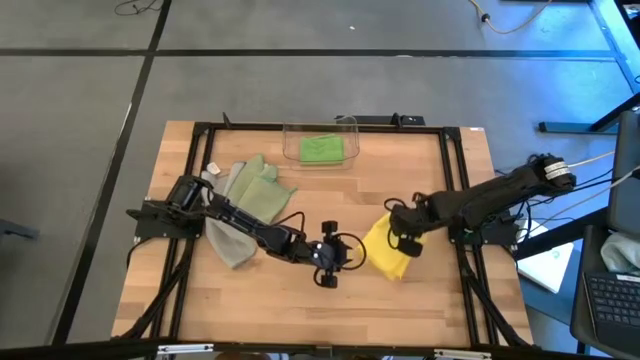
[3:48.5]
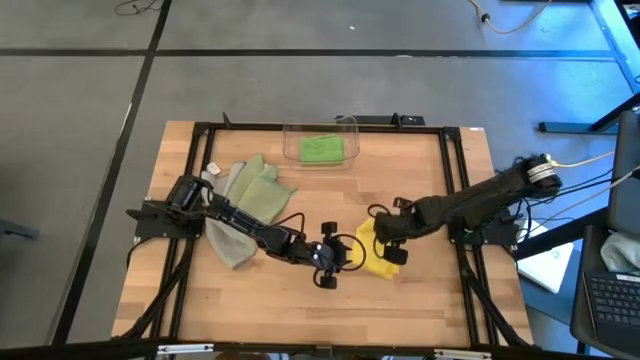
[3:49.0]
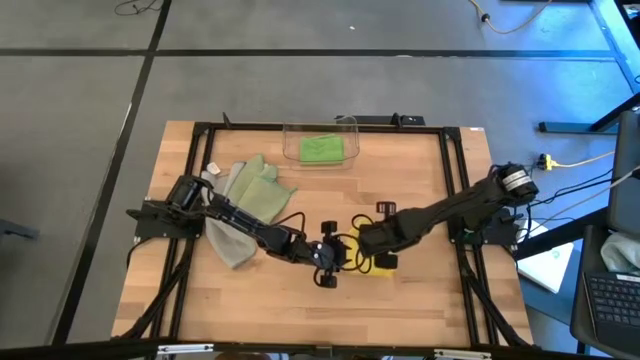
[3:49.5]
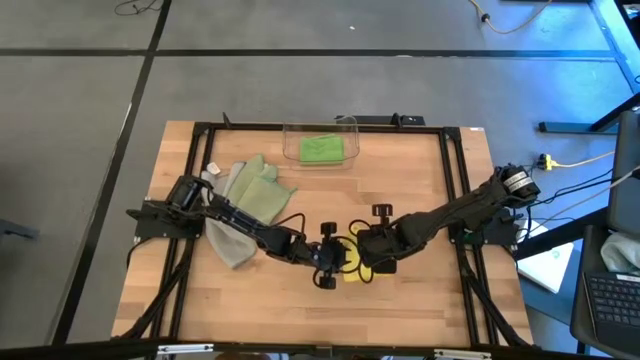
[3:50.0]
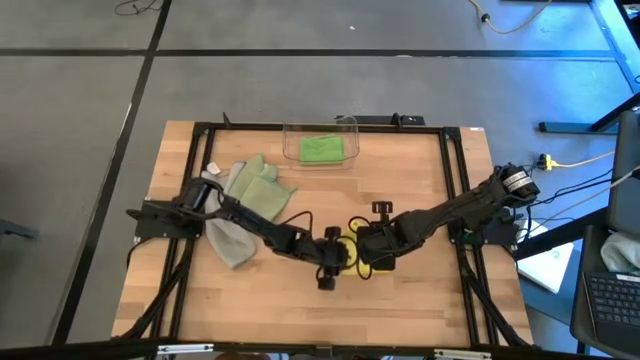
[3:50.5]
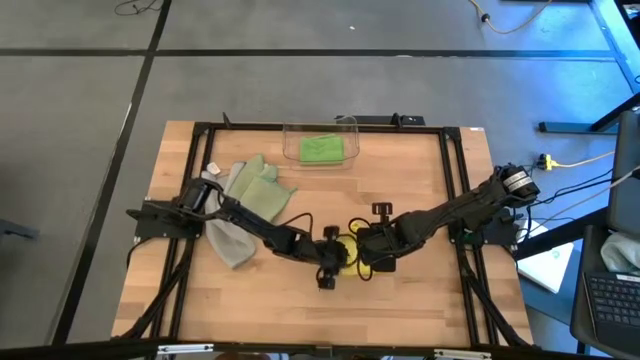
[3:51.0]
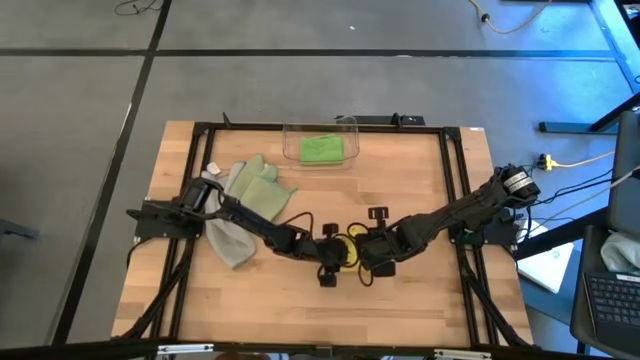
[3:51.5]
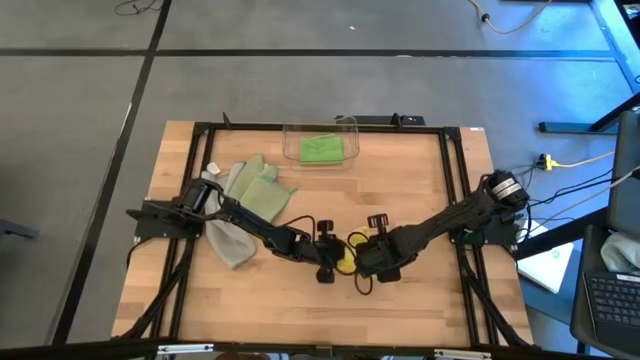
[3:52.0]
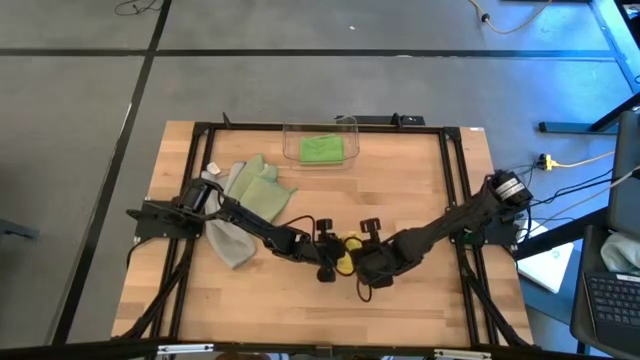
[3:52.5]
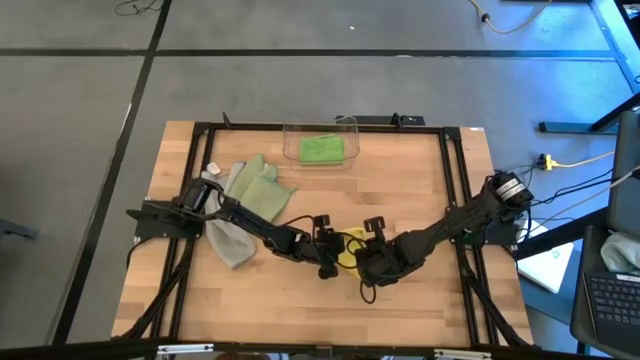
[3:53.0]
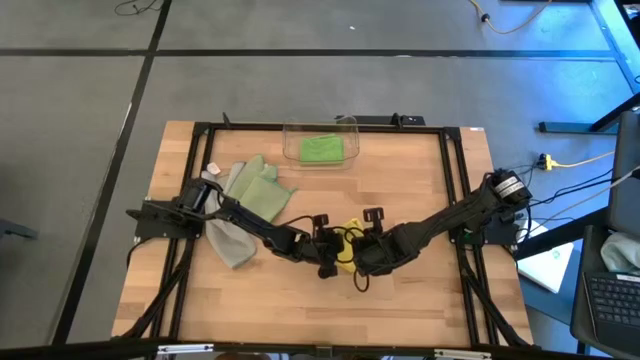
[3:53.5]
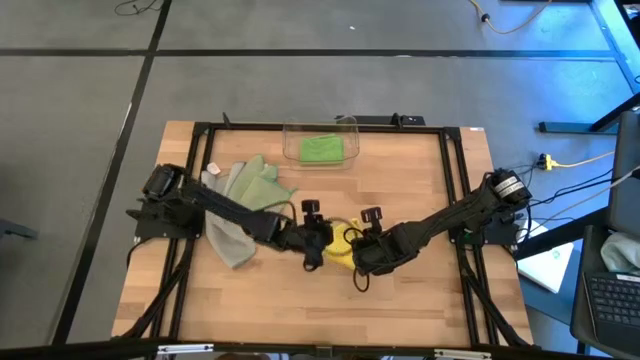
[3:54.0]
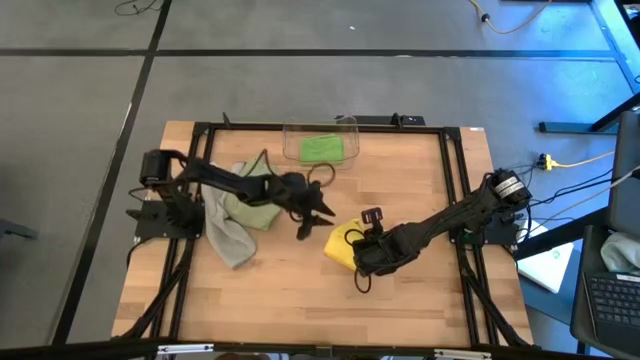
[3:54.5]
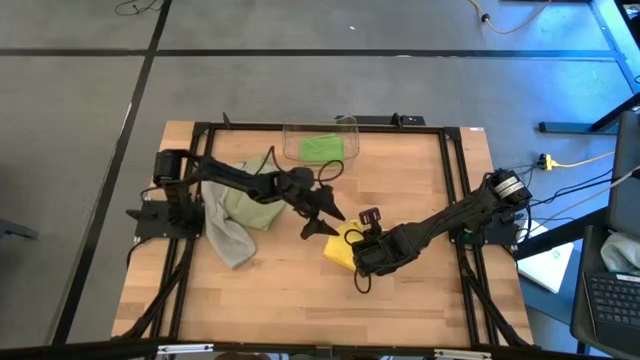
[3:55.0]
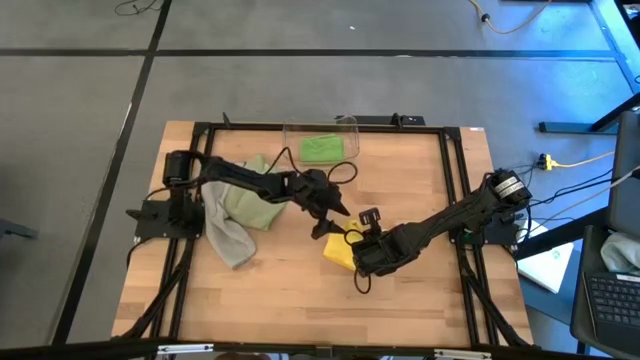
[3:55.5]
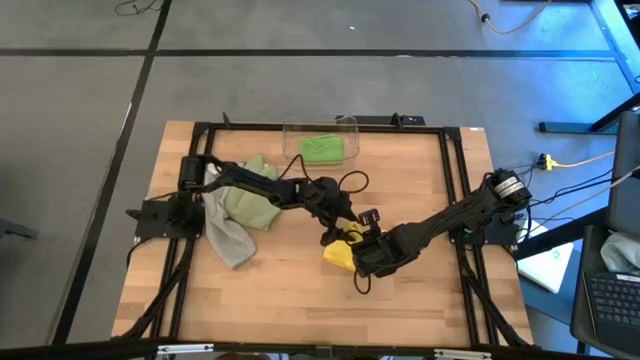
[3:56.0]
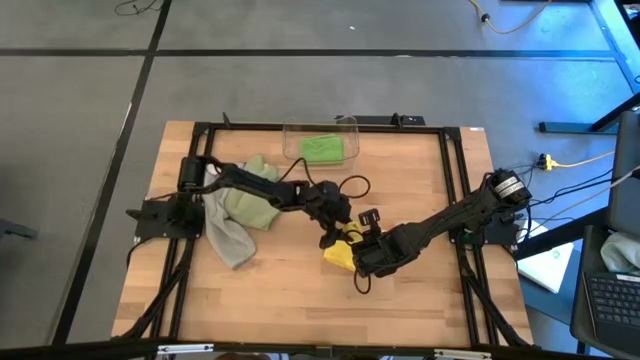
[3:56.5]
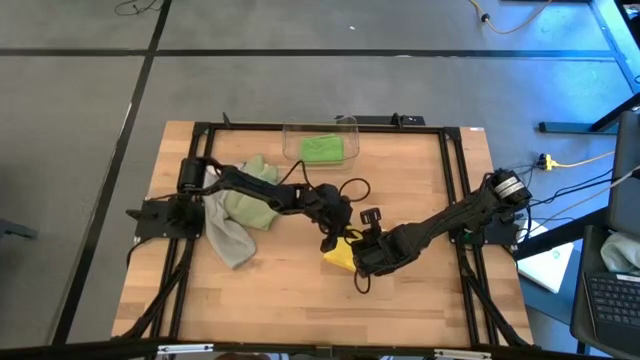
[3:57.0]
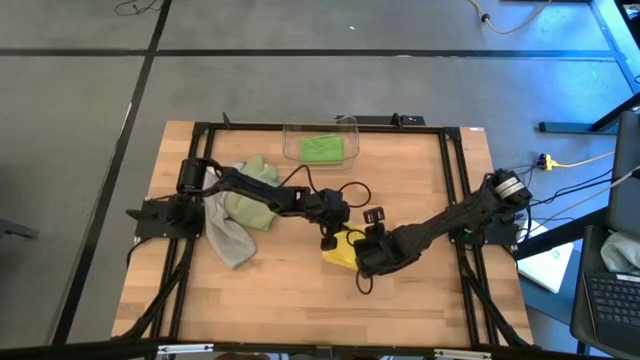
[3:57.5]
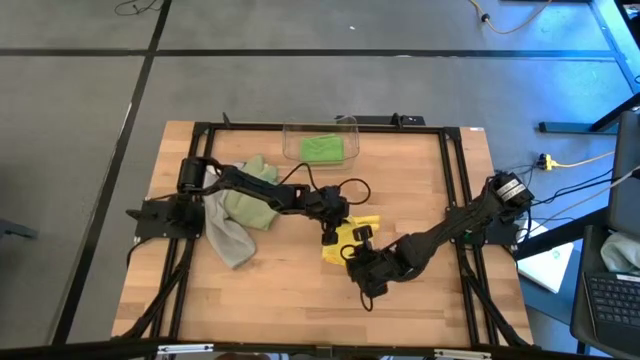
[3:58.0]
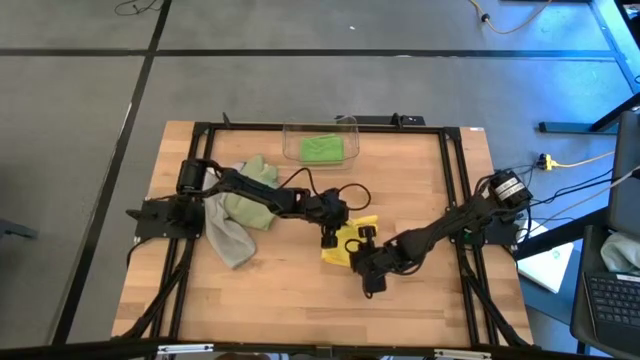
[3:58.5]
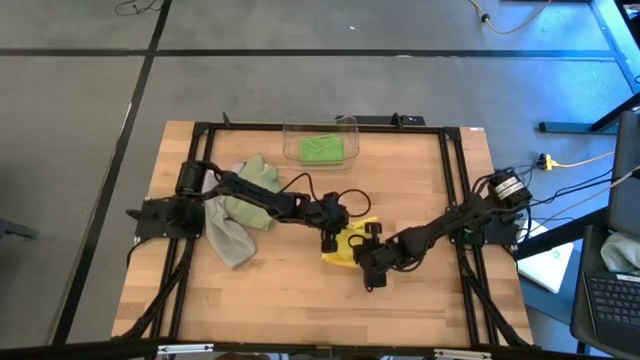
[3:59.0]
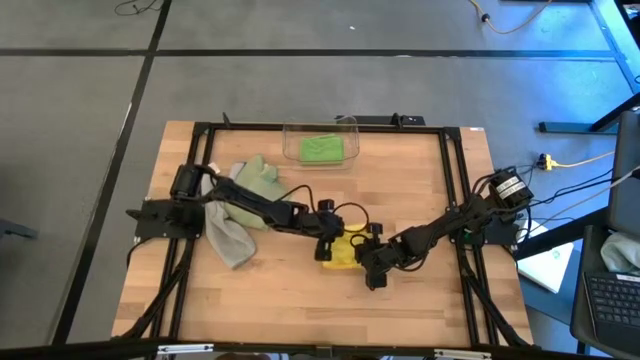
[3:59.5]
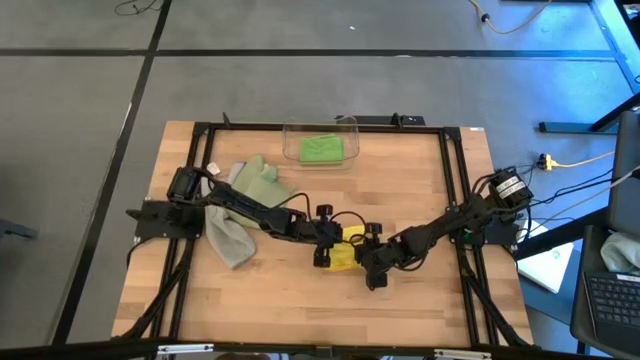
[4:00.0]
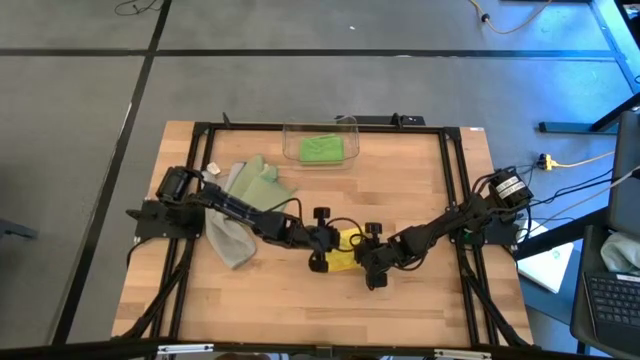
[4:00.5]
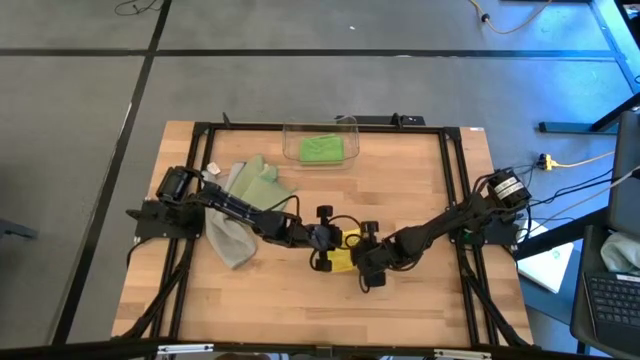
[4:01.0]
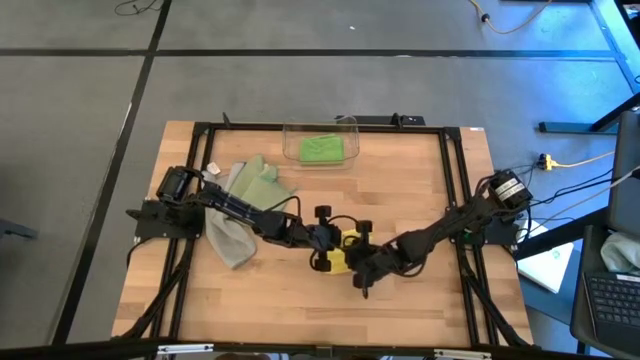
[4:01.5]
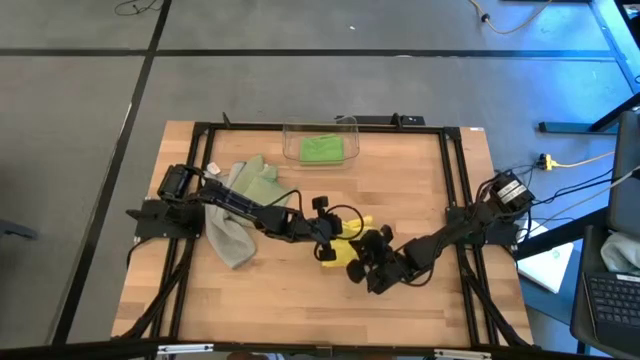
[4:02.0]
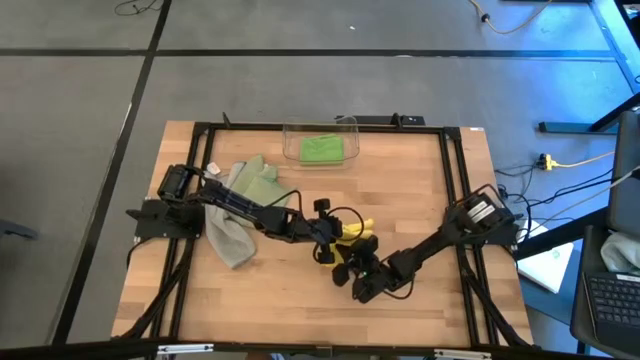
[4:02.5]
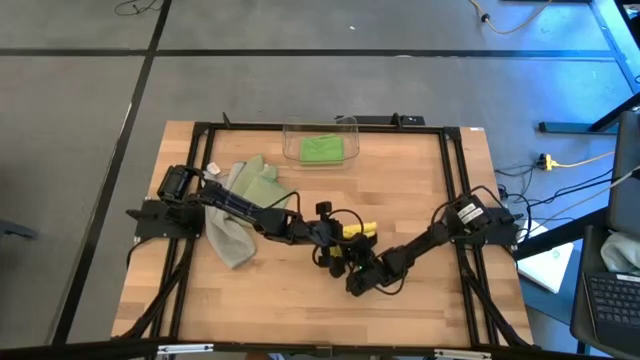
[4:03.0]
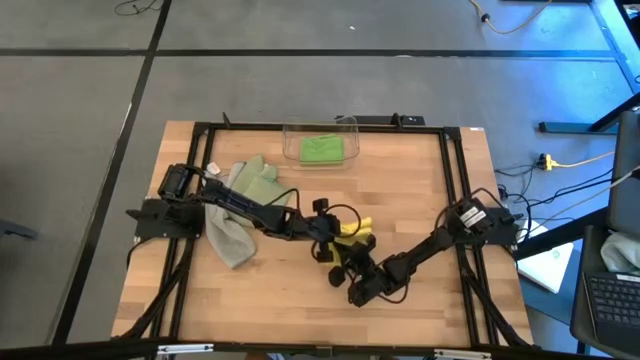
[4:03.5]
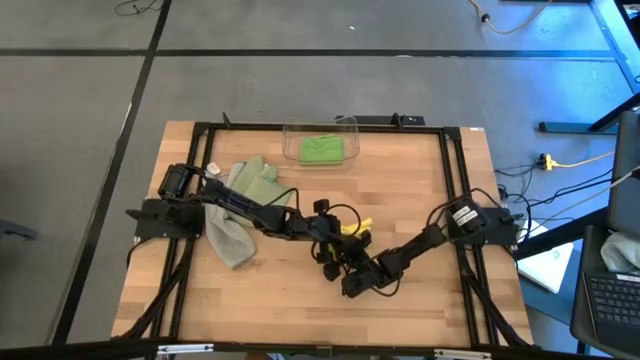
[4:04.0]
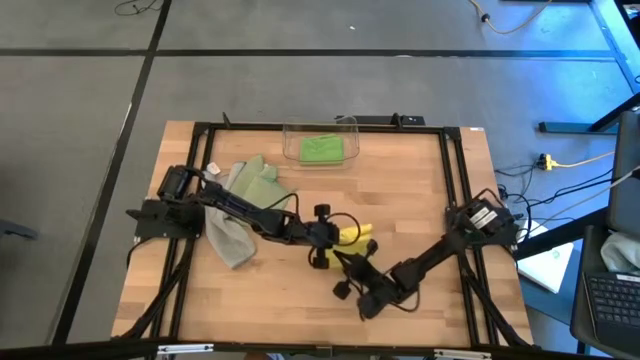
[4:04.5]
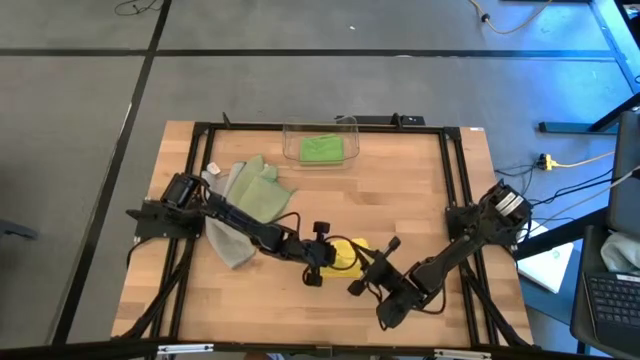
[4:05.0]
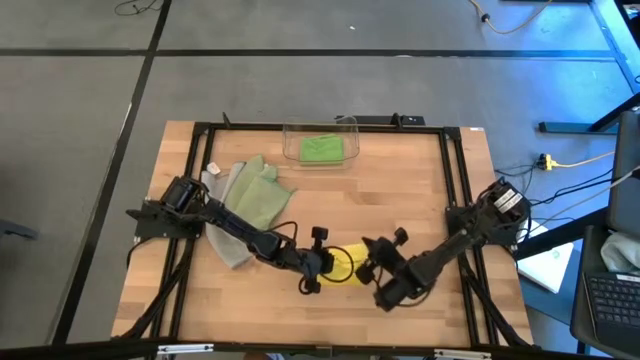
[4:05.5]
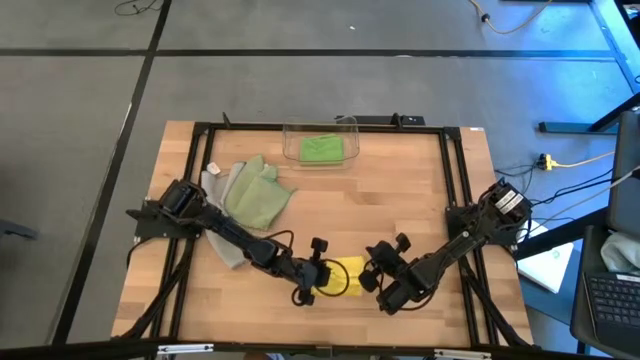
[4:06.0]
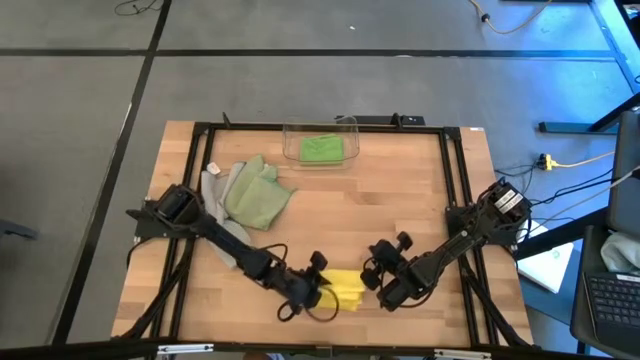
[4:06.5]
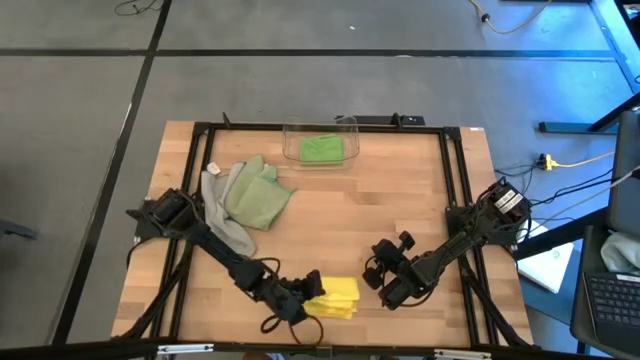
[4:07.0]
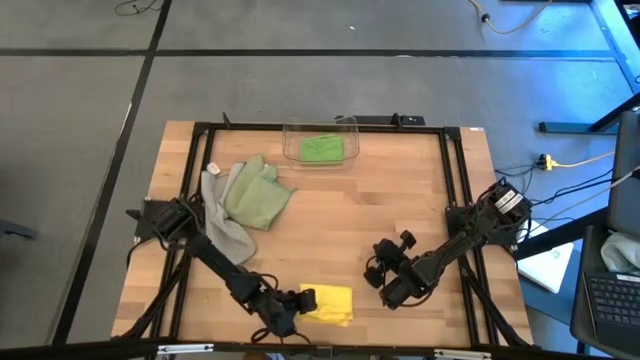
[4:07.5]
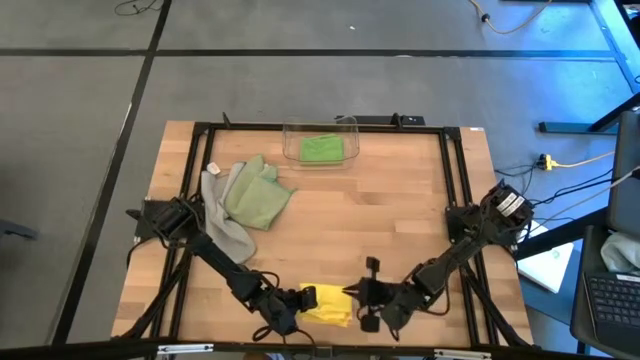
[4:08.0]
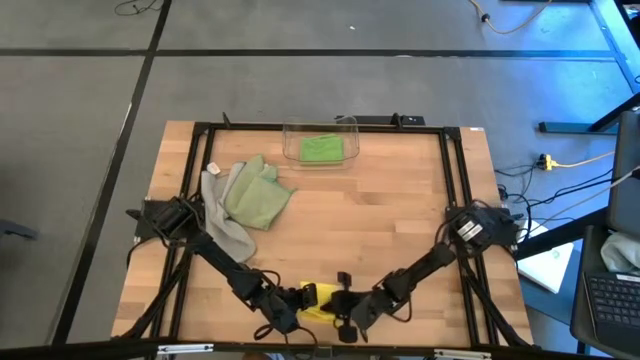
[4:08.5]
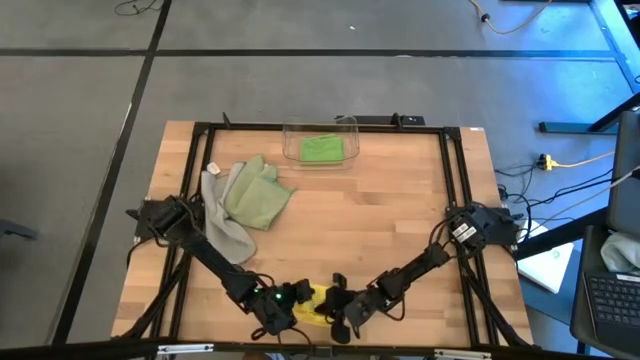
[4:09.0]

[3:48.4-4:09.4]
Task: Fold microfiber towels
Fold the yellow microfiber cloth
